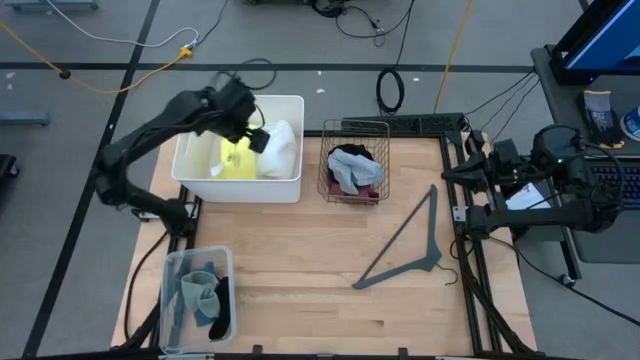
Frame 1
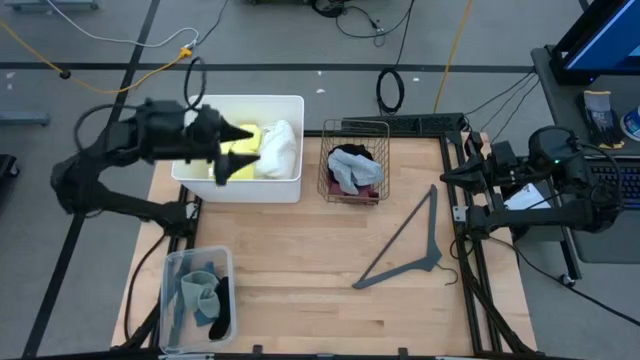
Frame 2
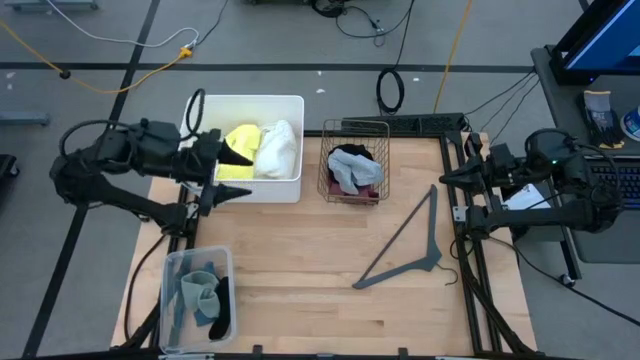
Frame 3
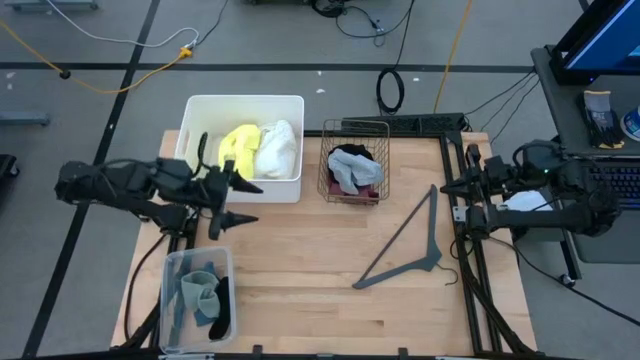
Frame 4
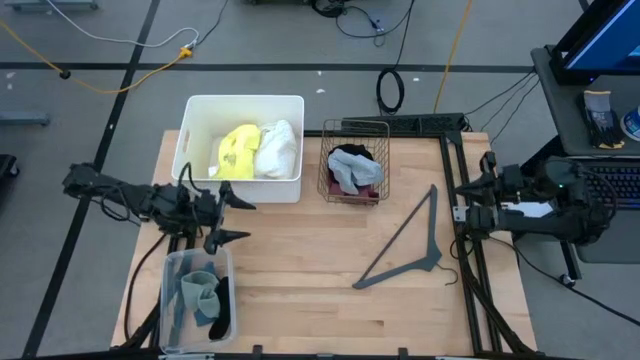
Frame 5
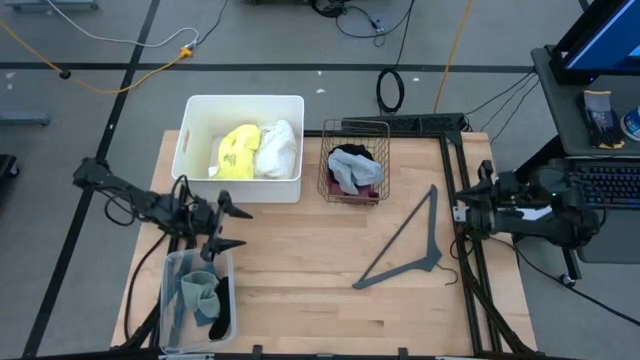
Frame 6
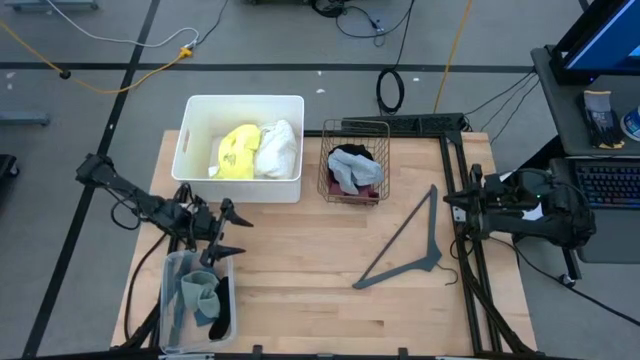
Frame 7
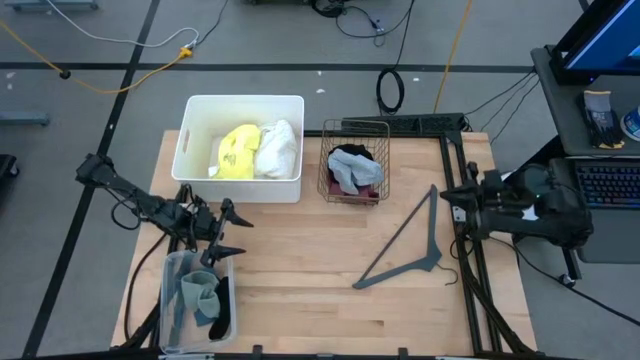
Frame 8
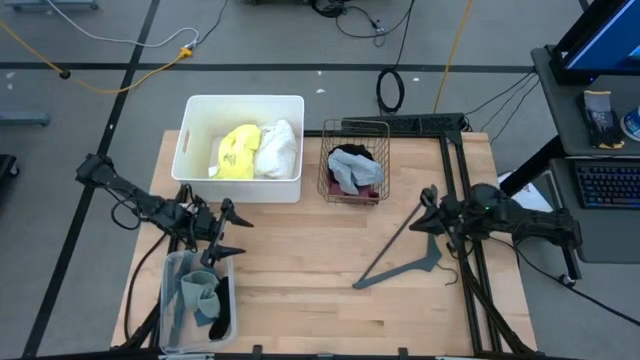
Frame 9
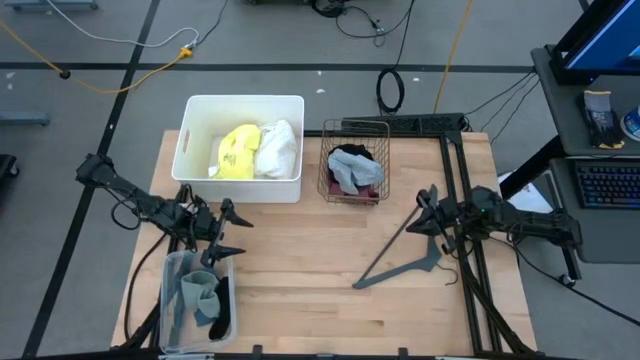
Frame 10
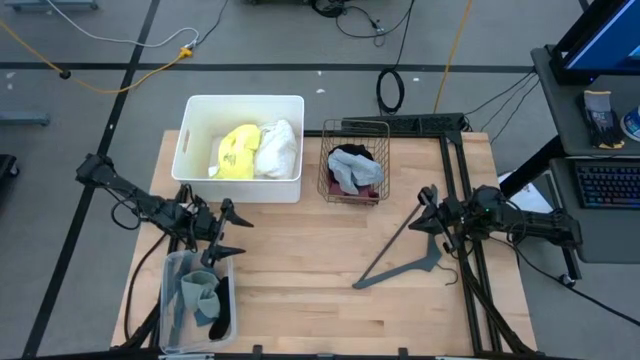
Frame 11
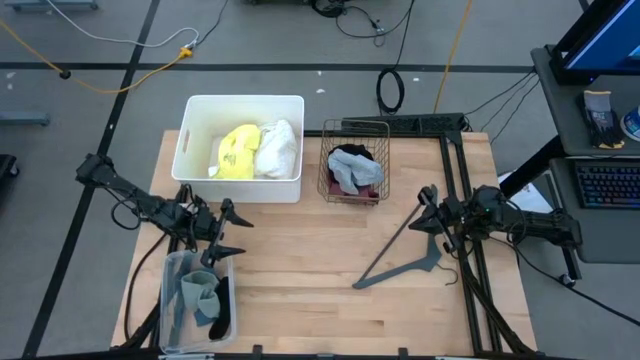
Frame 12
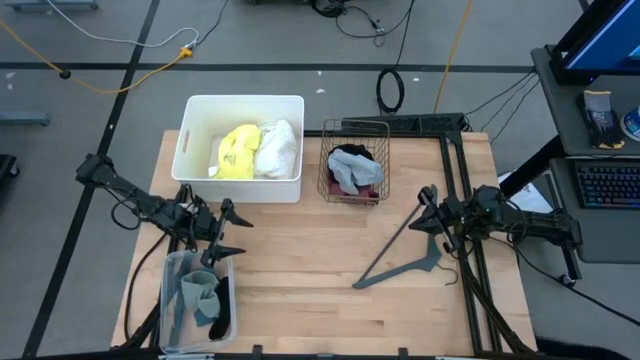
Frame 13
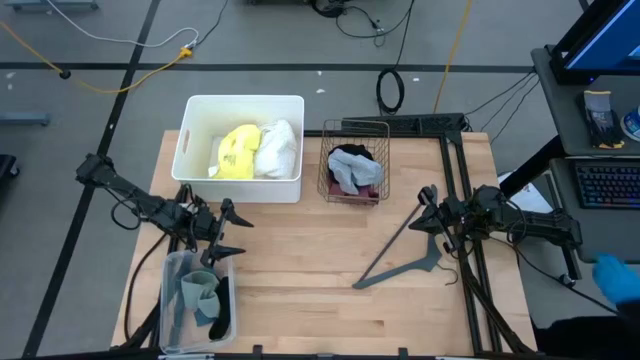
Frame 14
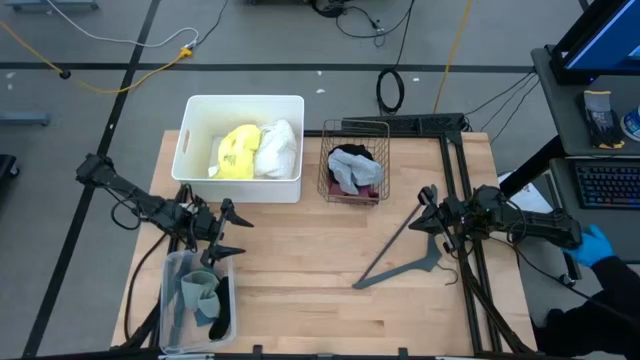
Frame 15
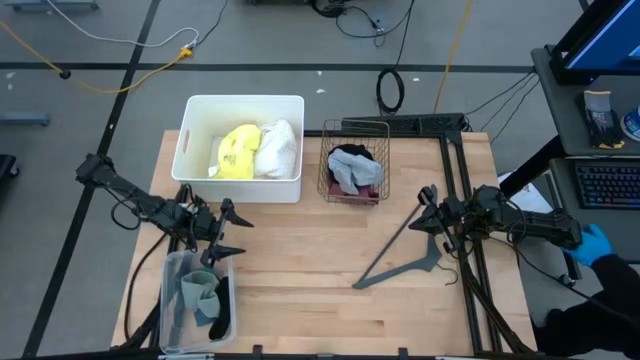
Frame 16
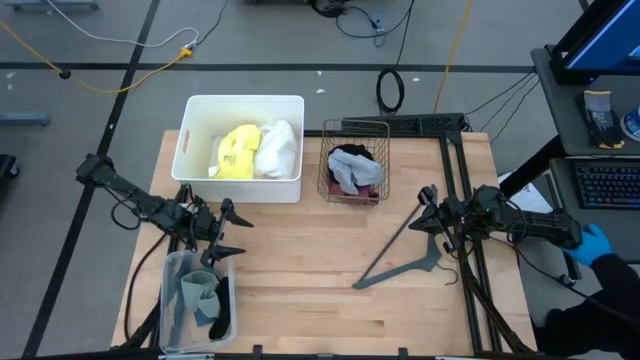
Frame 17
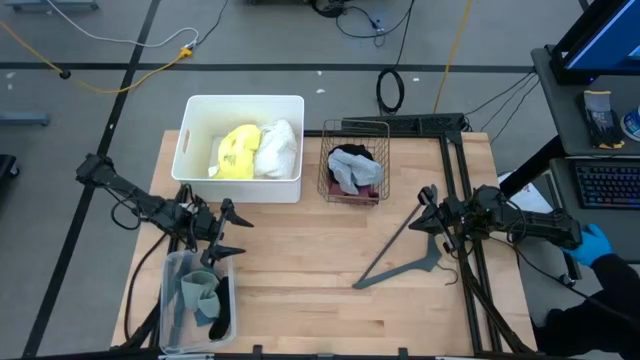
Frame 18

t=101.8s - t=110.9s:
Task: Pick & Place Cloths
Return to Home Position
